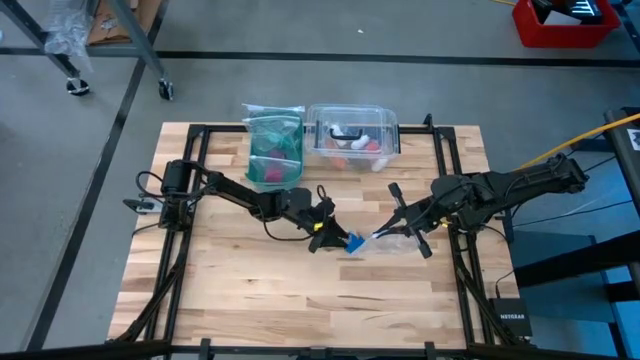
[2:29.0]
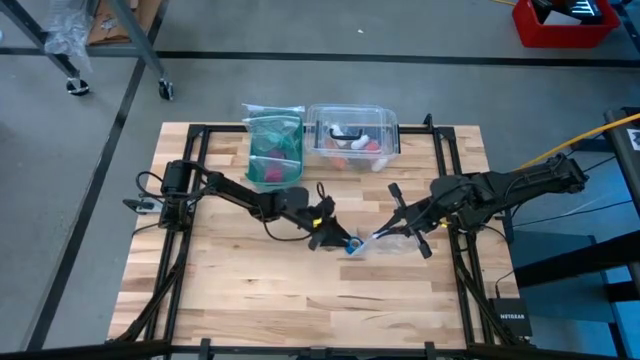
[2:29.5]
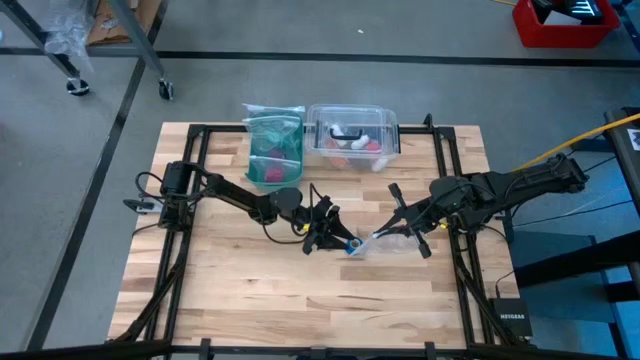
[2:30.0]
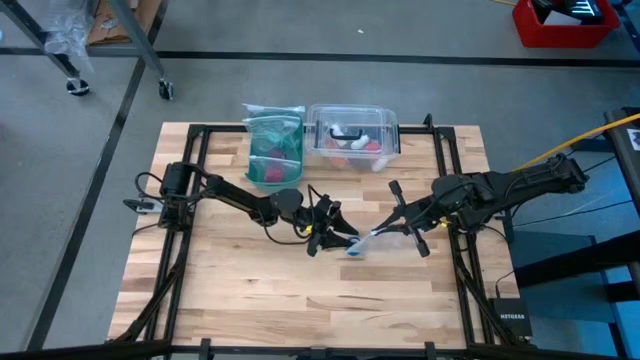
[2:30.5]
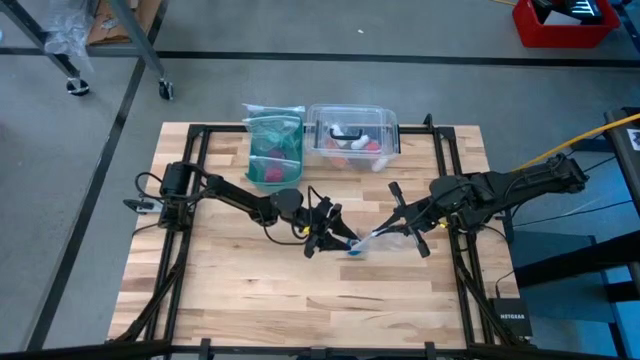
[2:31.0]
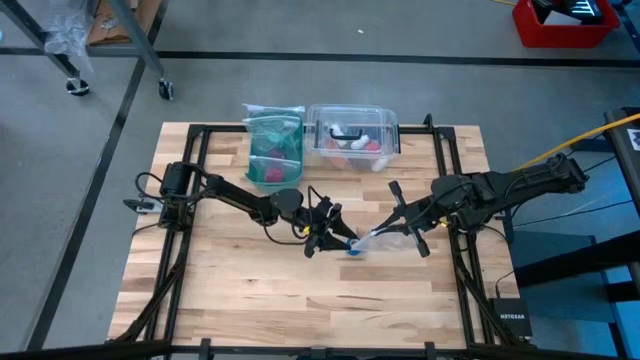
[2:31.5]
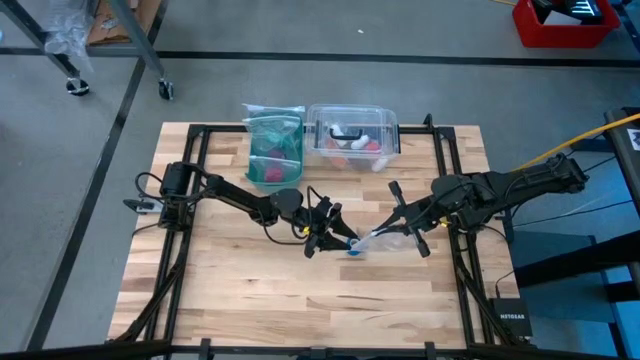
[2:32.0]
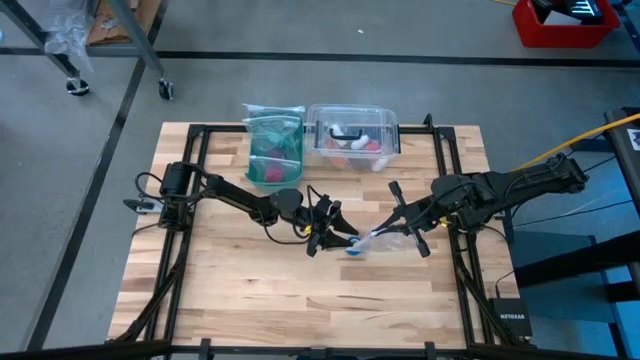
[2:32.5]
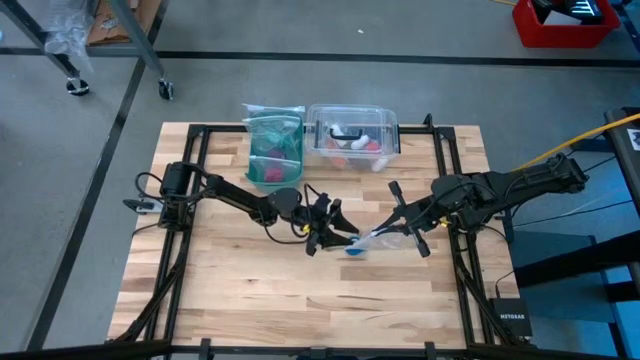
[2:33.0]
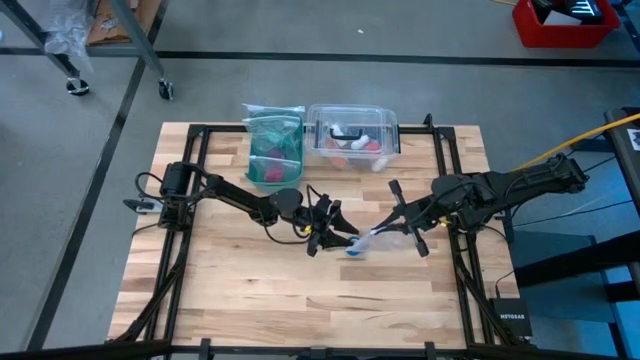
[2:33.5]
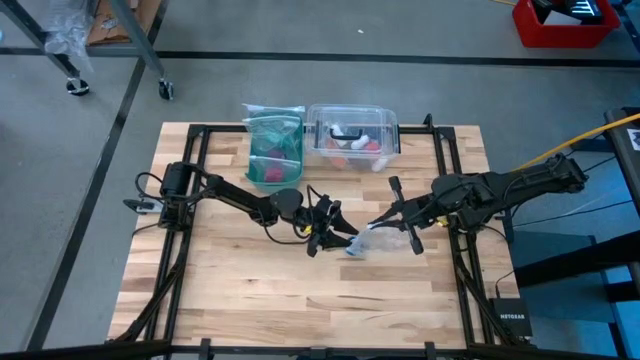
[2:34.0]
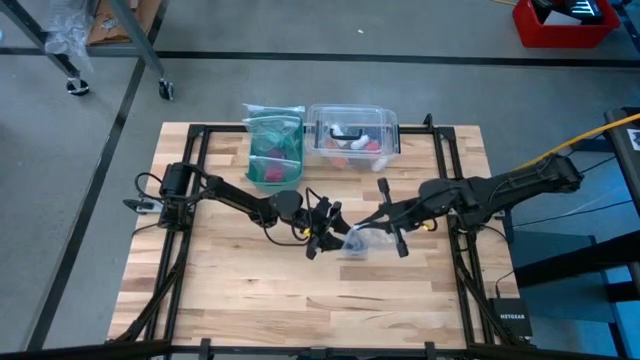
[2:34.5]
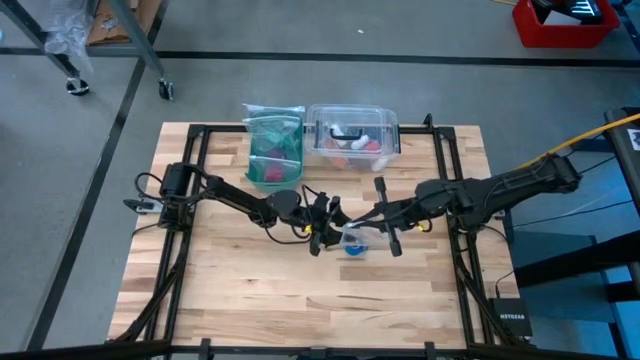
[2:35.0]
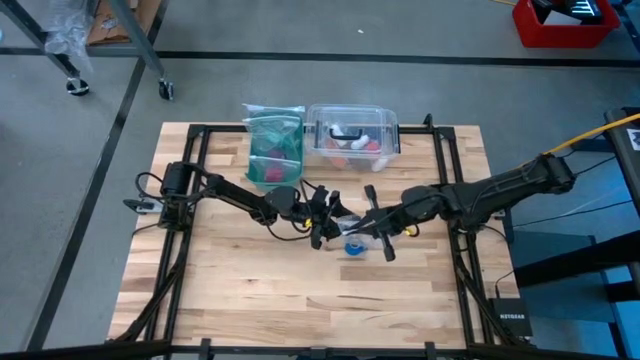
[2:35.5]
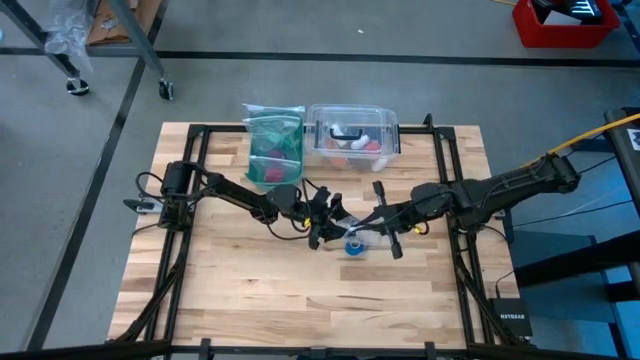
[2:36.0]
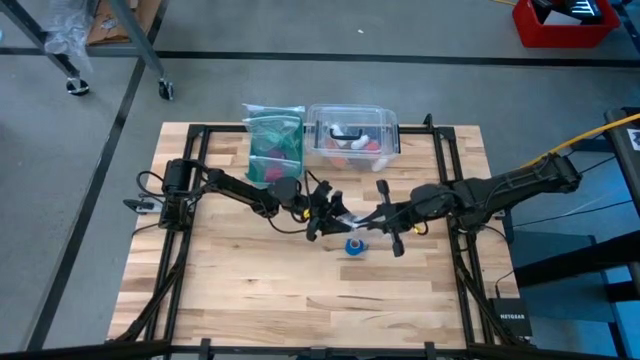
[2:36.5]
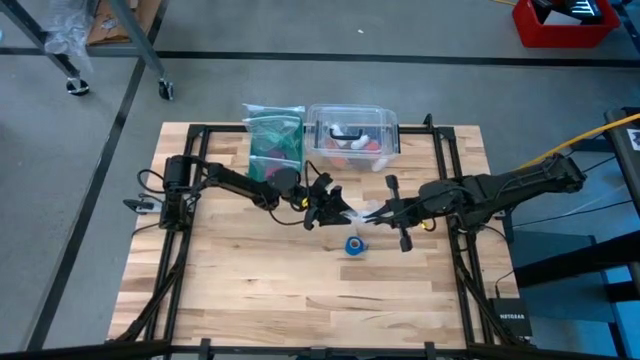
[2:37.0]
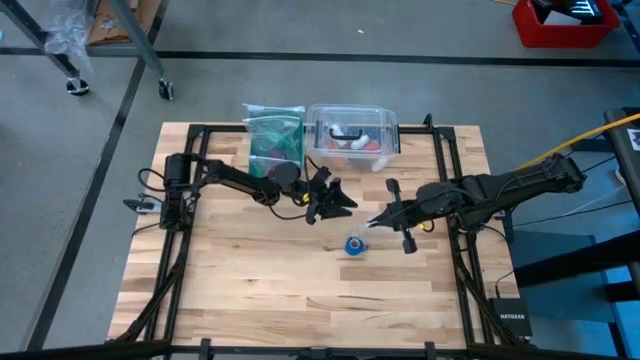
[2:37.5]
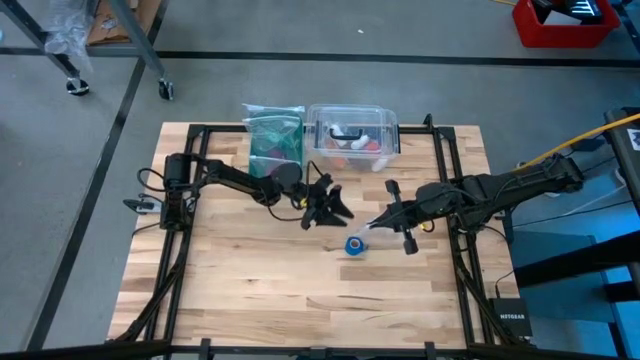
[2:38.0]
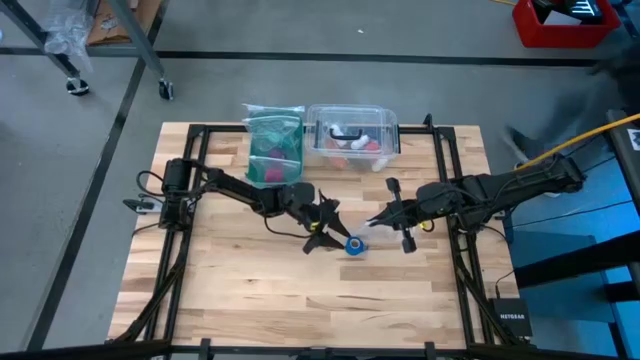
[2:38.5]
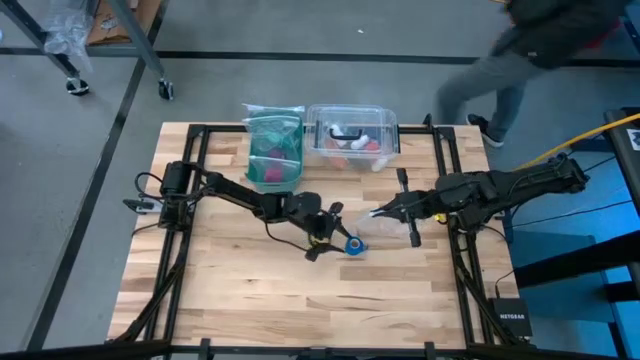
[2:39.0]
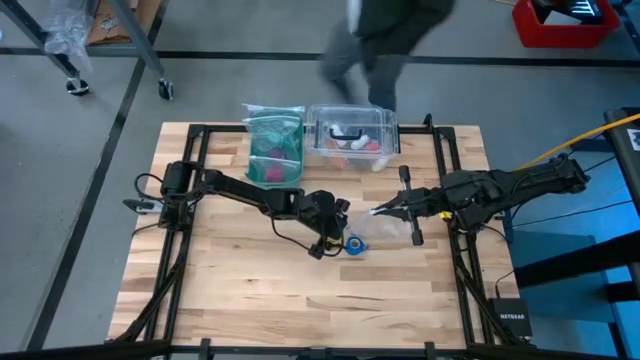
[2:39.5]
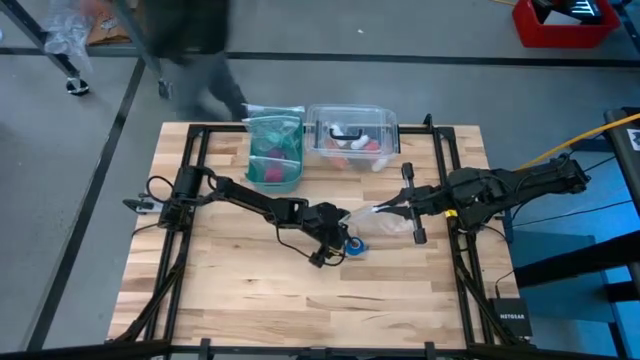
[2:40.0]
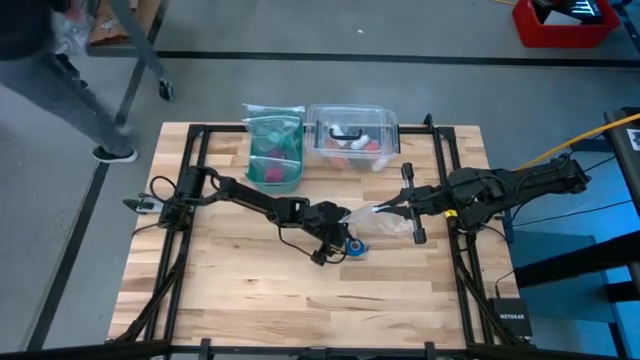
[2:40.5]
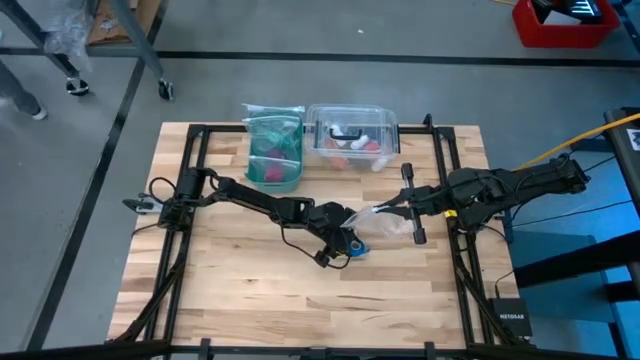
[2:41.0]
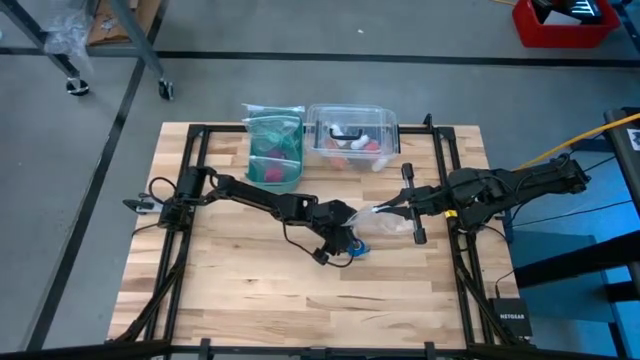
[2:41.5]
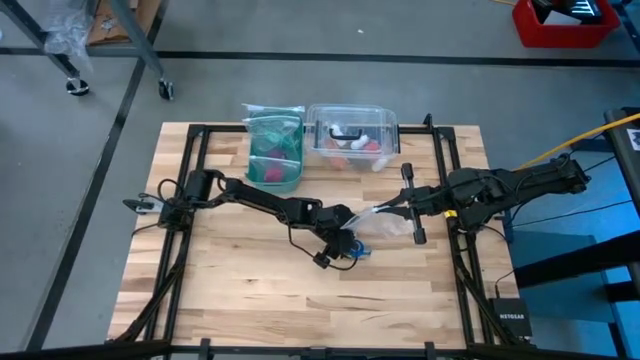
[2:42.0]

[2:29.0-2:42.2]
Task: Roll bandage
Put the blue bandage into the transparent zip bag

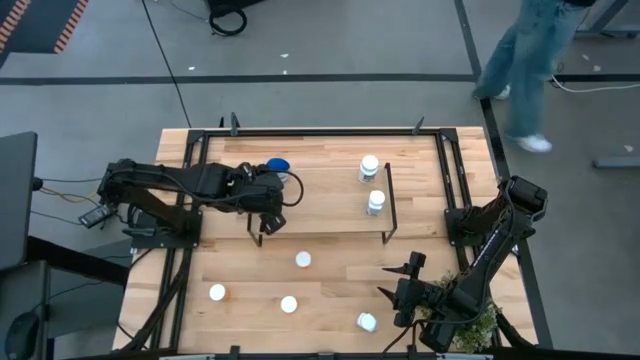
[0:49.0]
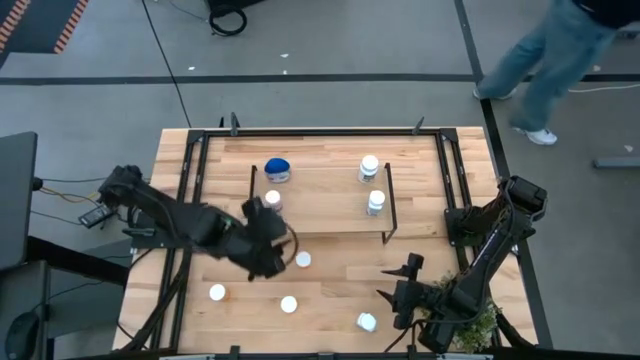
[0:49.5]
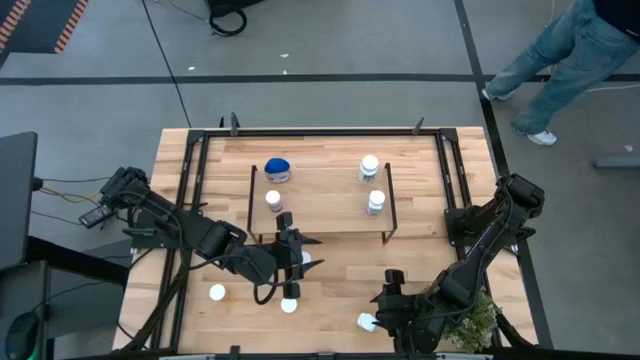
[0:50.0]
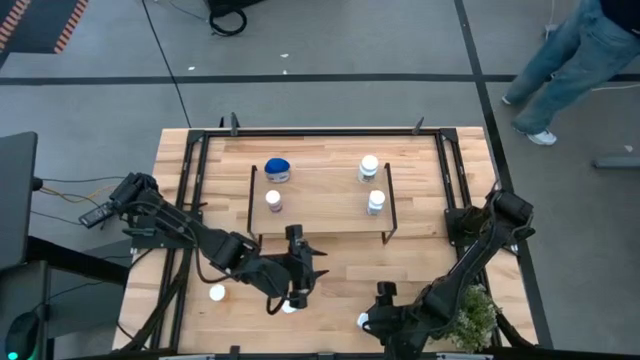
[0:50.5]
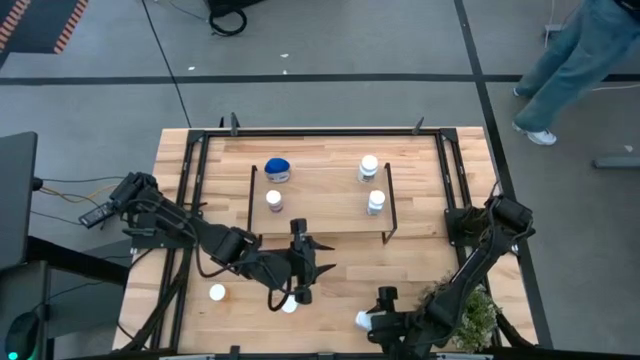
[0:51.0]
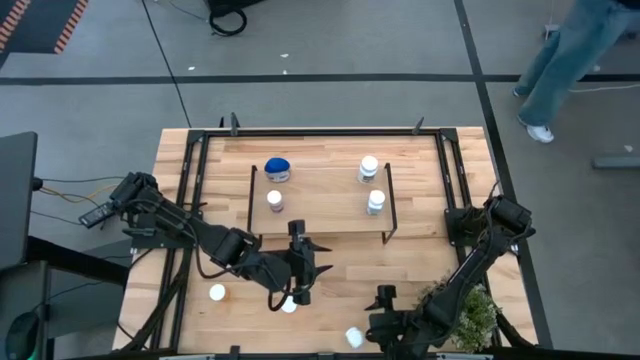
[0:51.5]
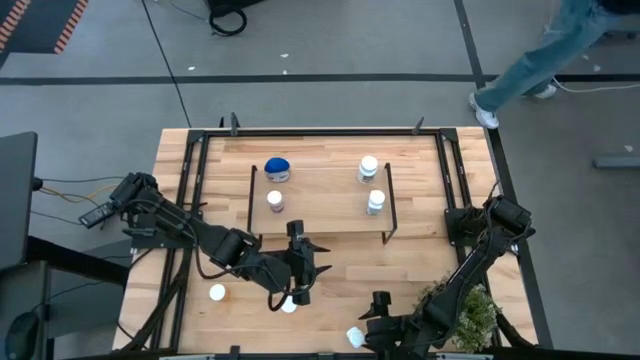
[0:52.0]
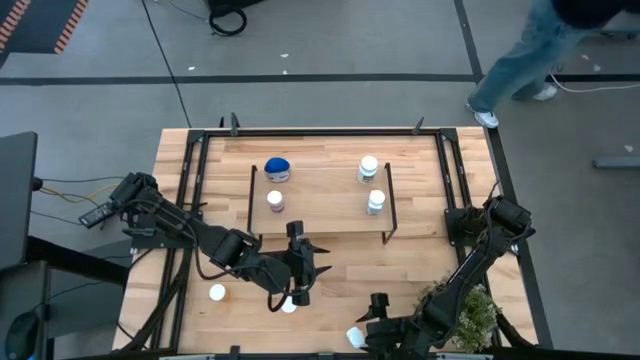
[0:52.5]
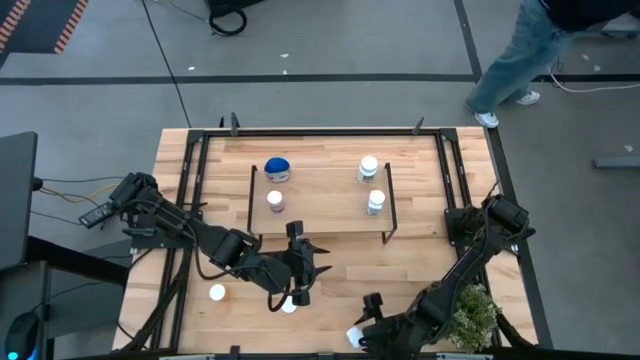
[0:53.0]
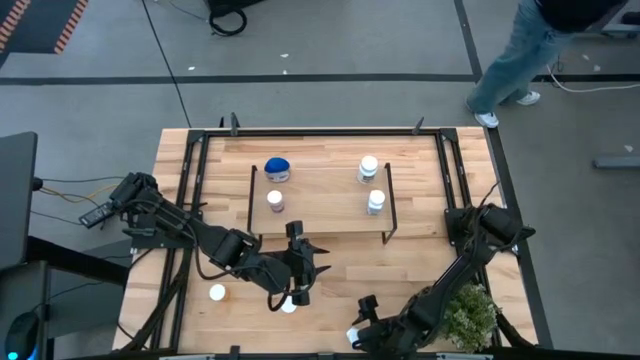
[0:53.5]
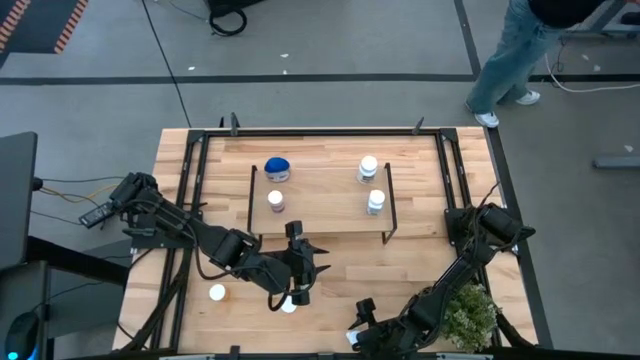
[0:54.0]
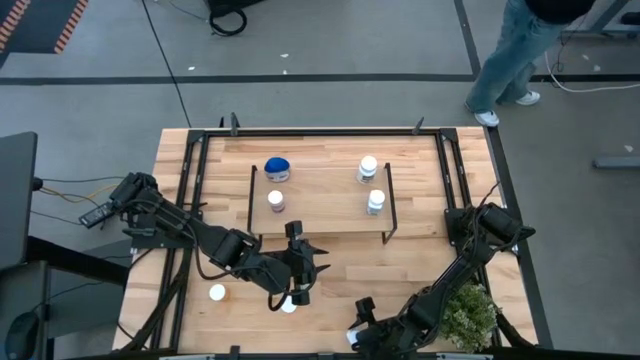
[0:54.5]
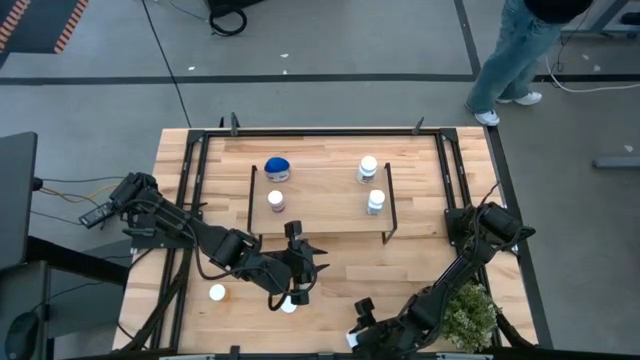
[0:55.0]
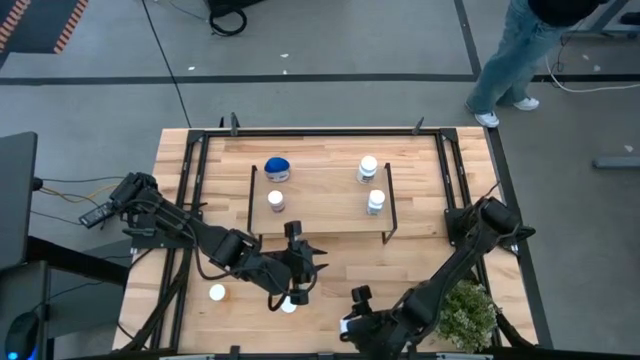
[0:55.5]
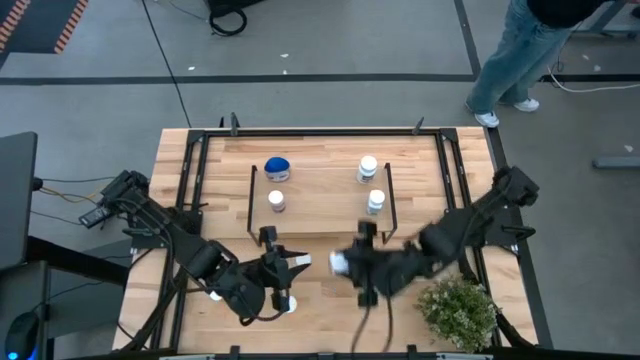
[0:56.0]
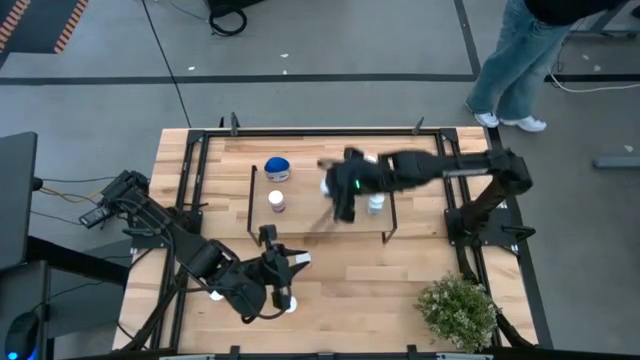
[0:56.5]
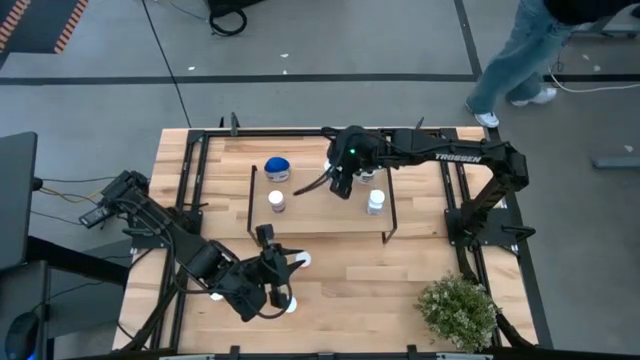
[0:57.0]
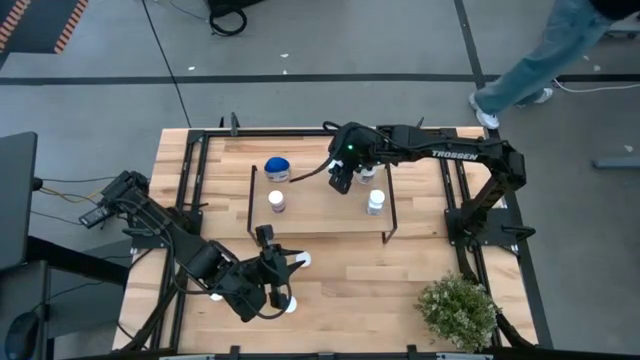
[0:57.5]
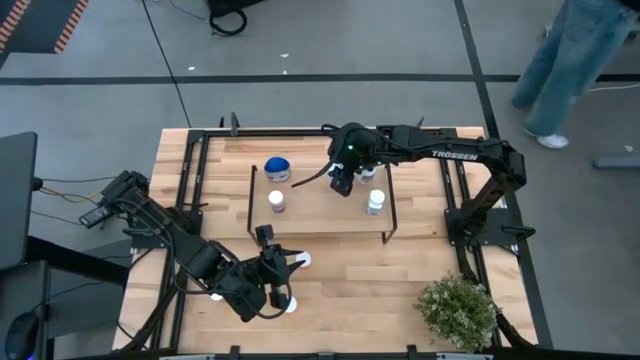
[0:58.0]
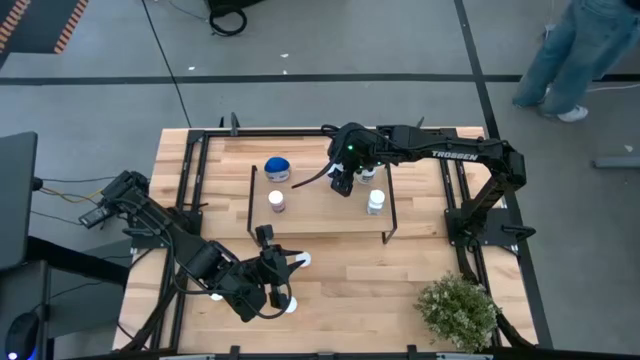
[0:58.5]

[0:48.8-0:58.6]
Task: Pick and place medicine bottles onto shelf by color
Put the light blue medicine bottle on the shelf
